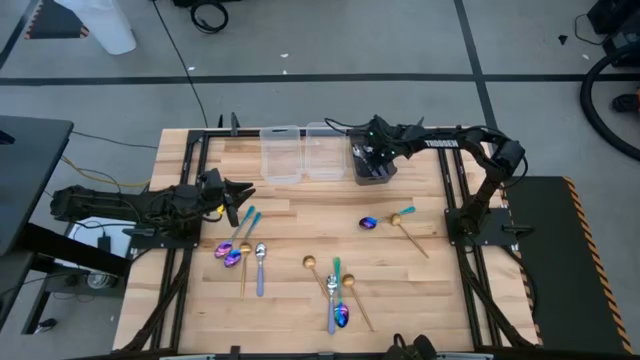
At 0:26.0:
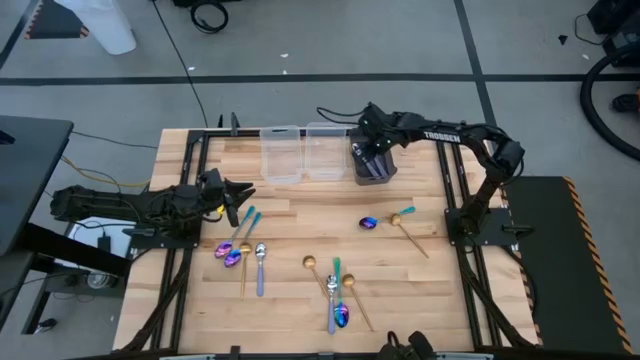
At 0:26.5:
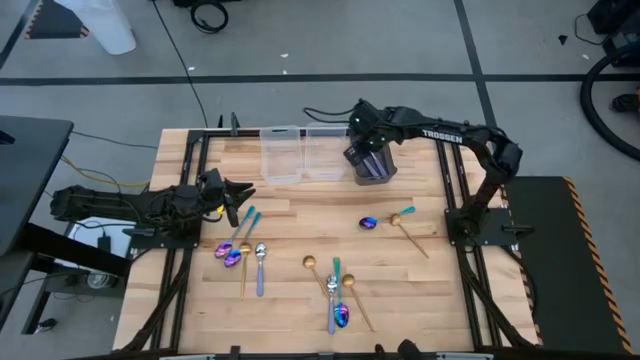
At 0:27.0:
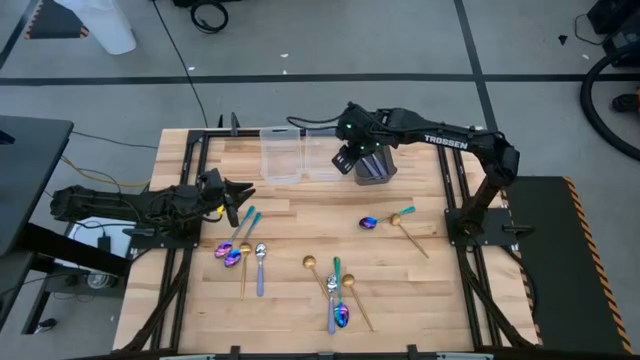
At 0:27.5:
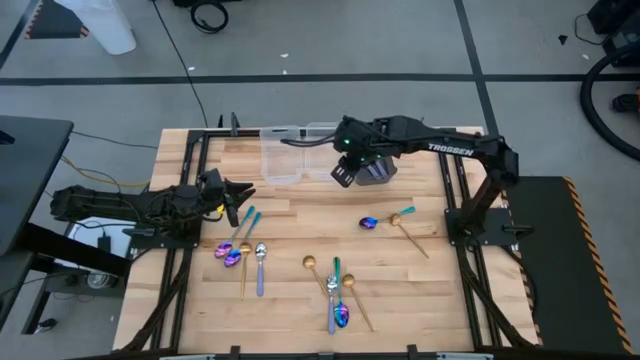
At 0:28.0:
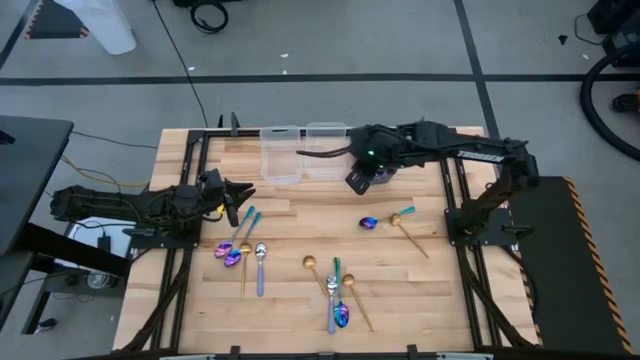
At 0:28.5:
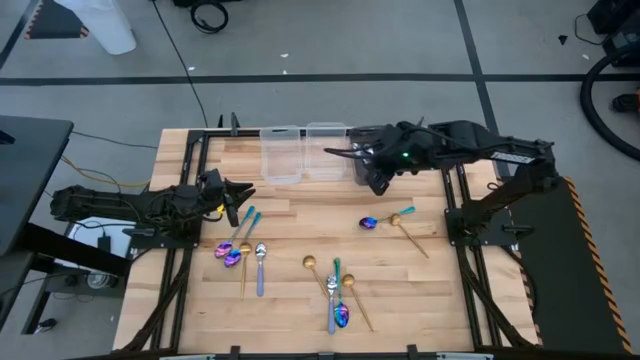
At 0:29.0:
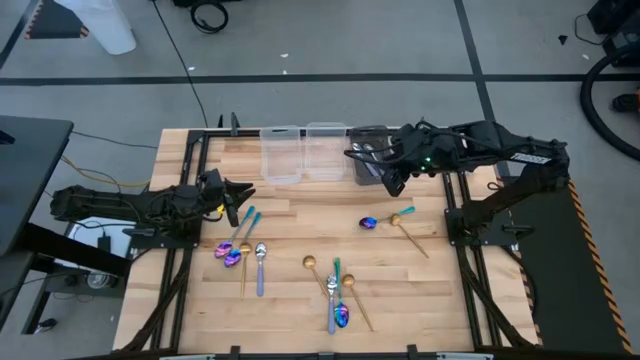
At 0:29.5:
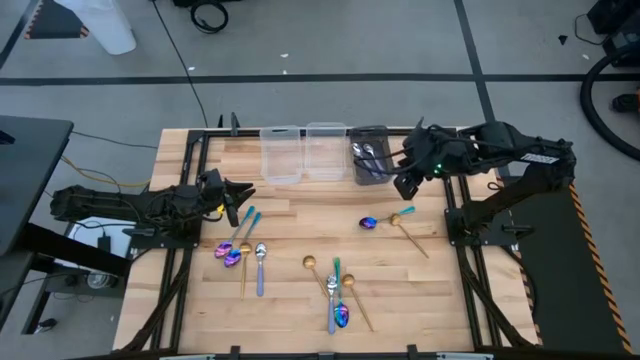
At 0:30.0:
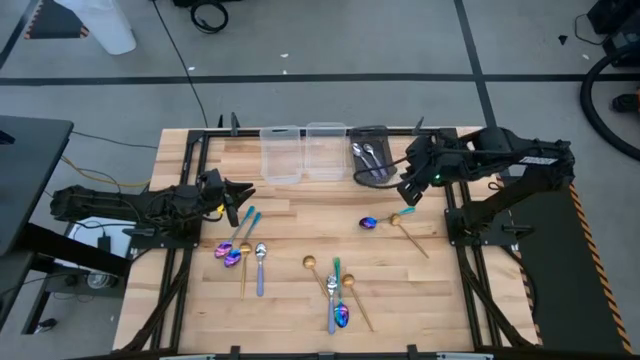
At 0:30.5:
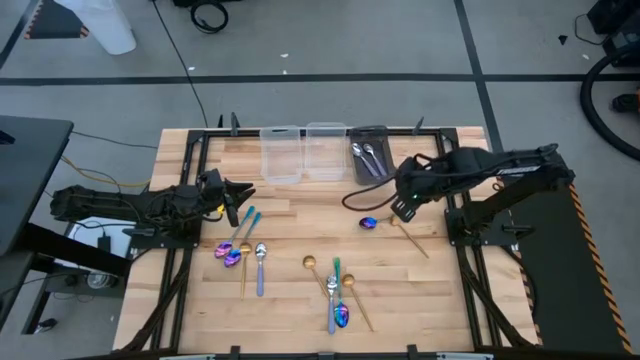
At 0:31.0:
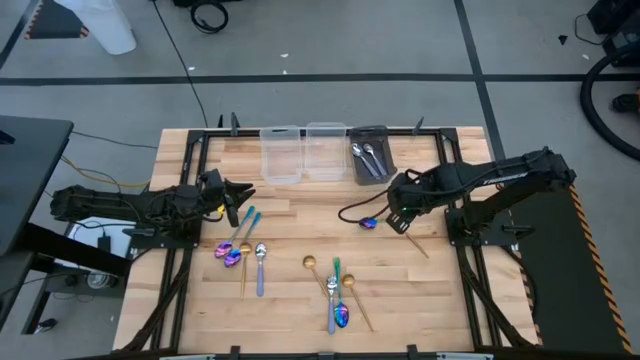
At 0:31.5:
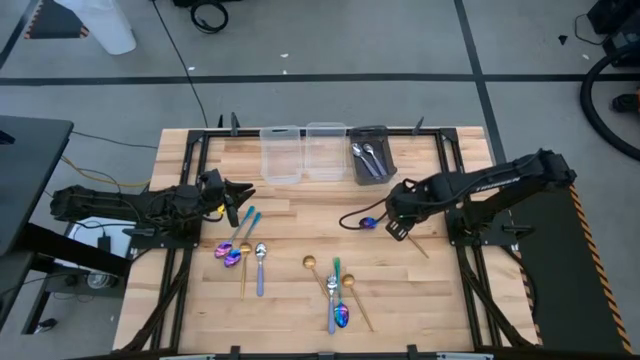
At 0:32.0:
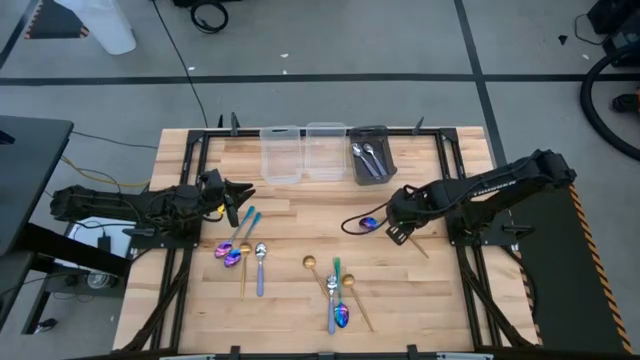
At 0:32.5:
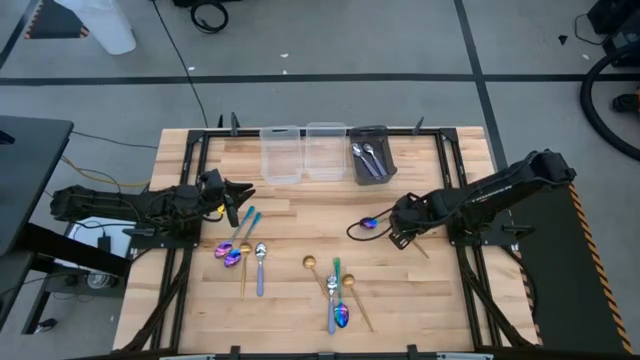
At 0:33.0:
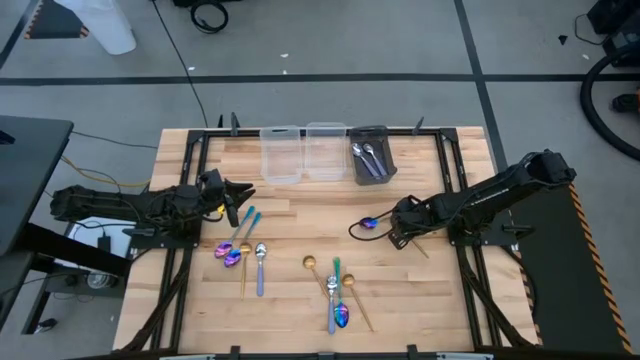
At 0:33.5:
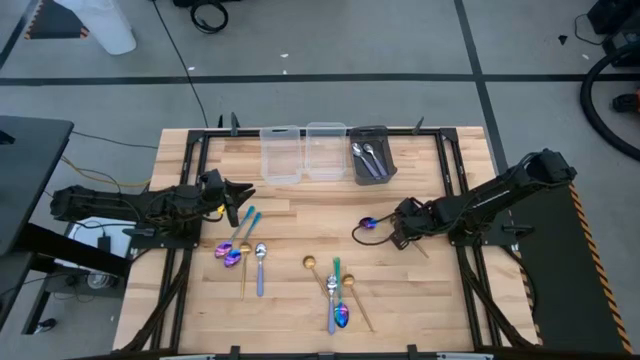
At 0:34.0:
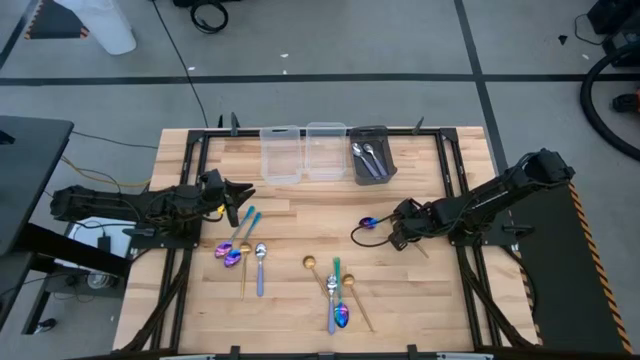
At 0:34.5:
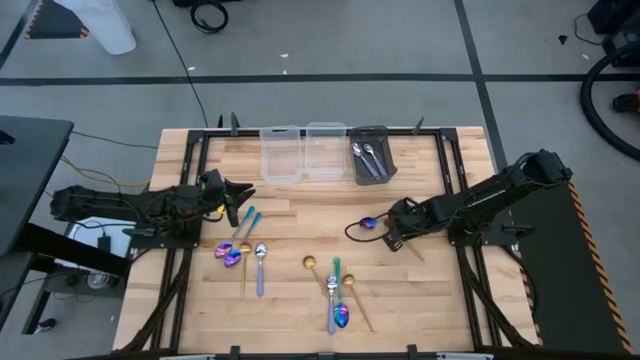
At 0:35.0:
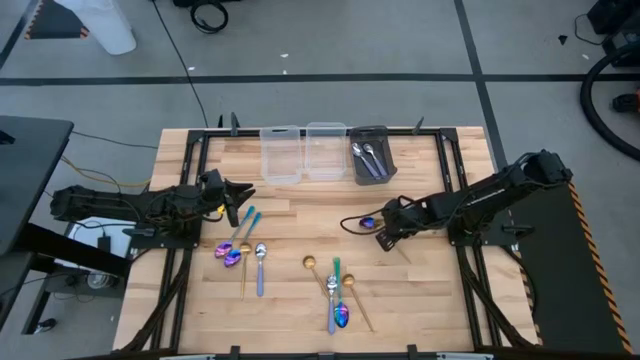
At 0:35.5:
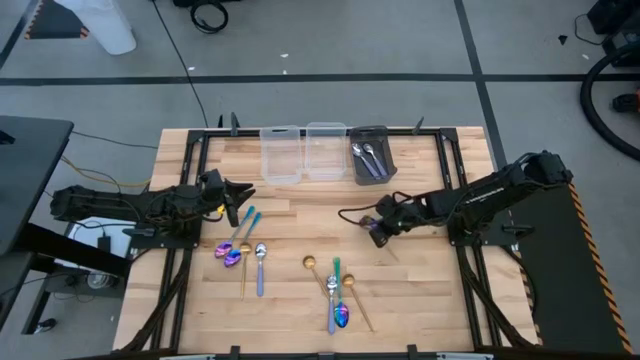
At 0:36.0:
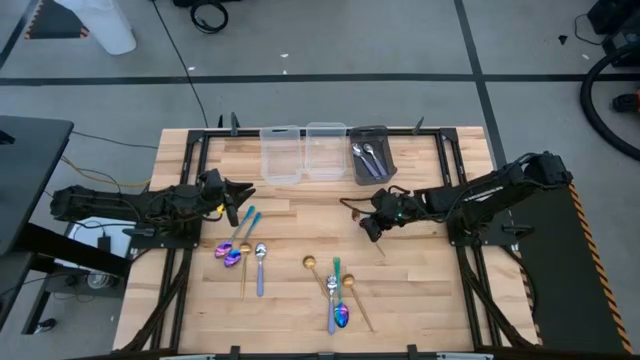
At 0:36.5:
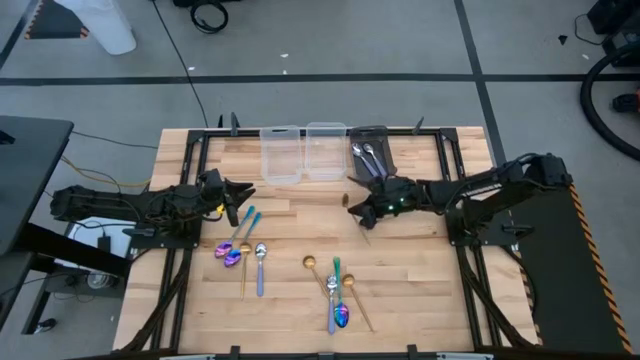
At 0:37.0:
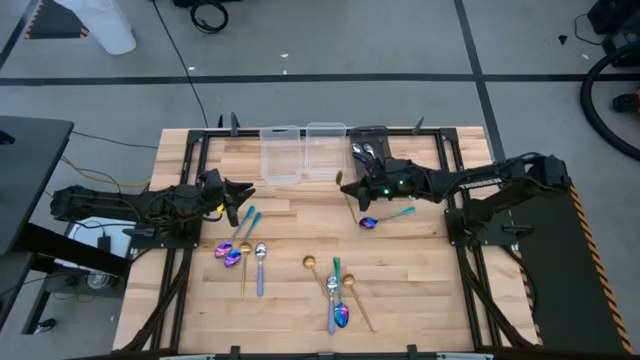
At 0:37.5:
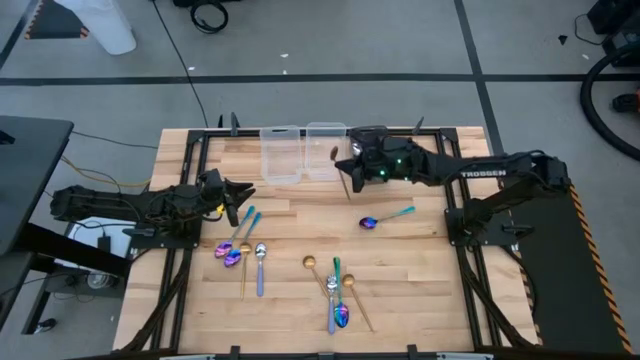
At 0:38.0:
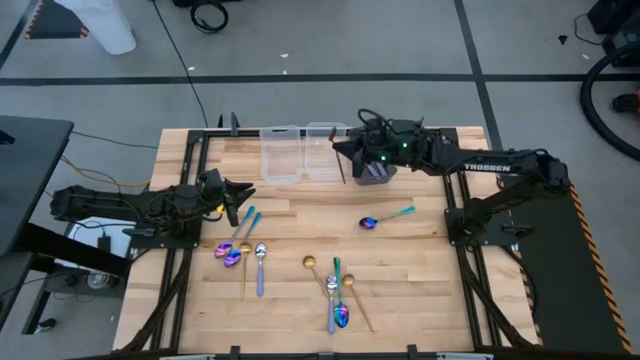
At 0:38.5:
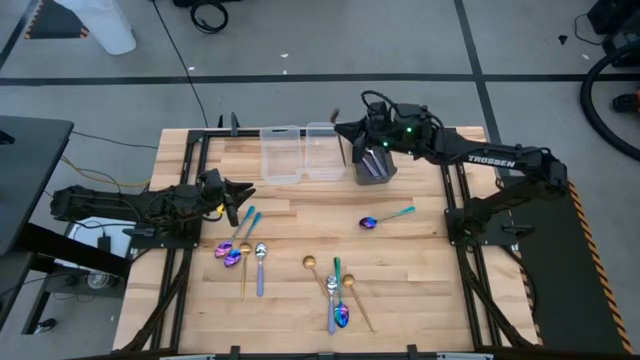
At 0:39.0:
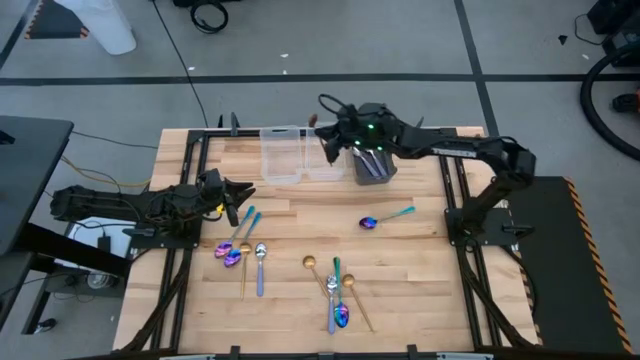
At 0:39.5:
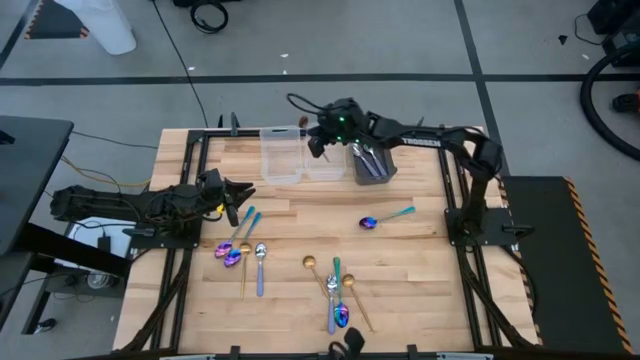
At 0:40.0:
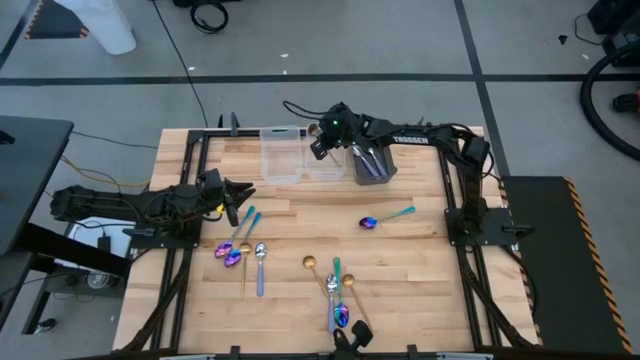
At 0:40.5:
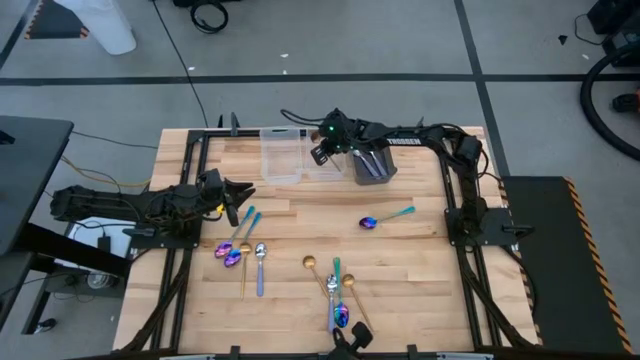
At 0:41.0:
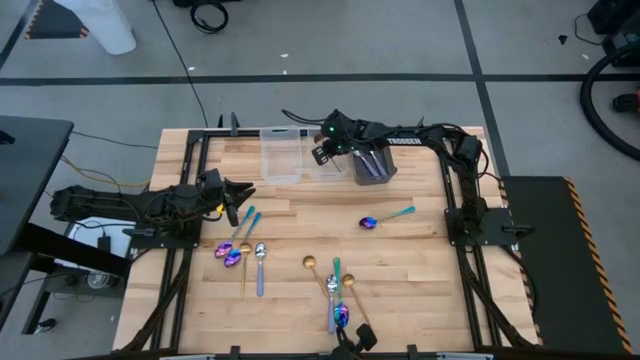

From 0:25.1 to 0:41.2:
Task: Sort silverware by color (type)
Put the gold spoon into the right transparent bin

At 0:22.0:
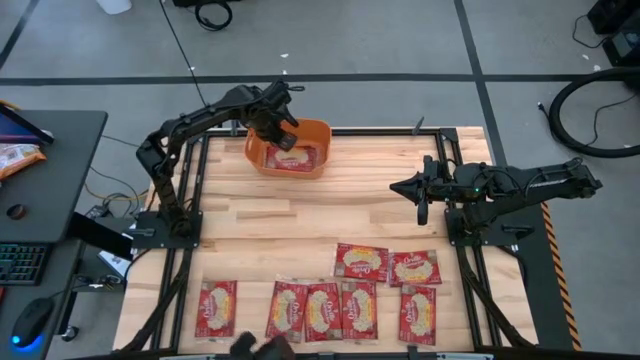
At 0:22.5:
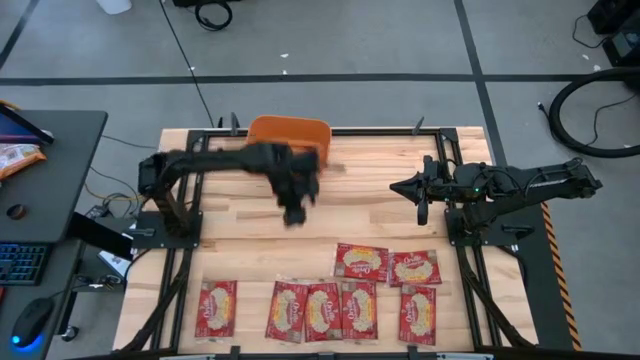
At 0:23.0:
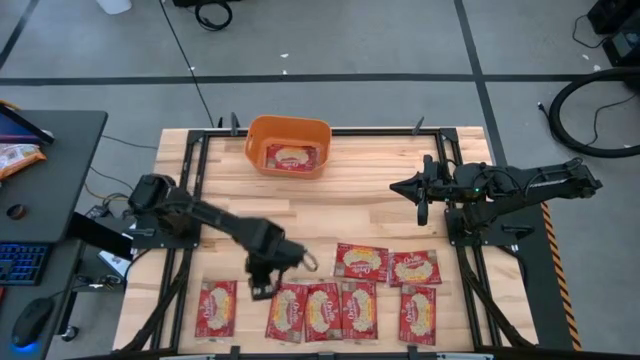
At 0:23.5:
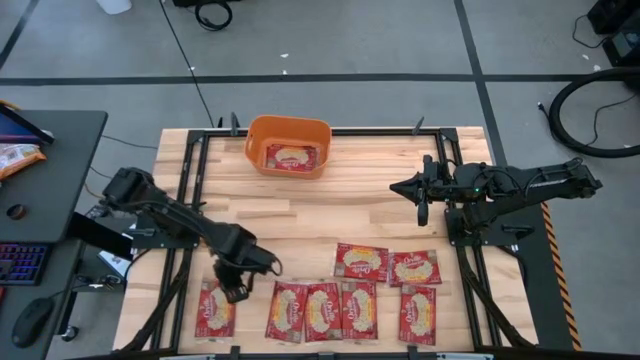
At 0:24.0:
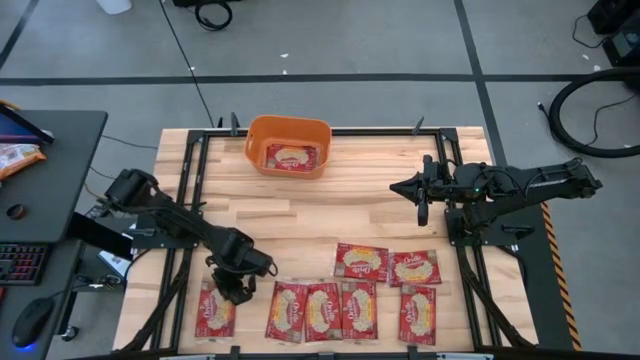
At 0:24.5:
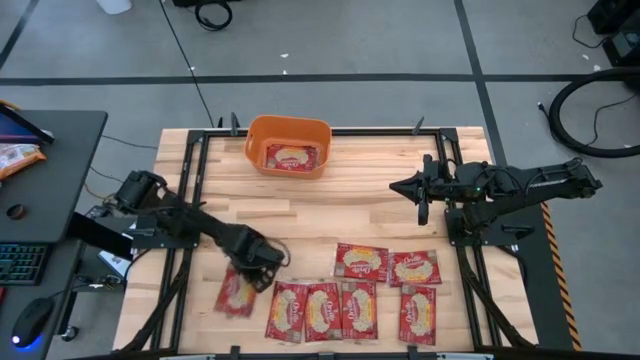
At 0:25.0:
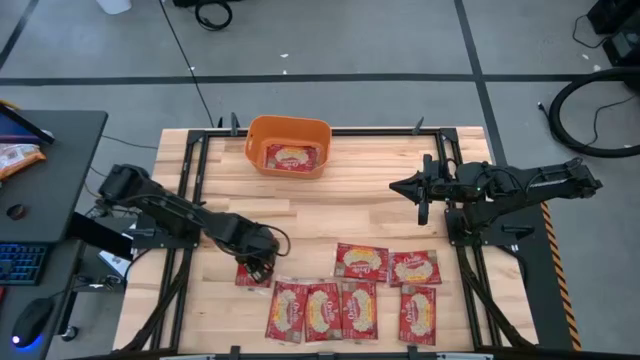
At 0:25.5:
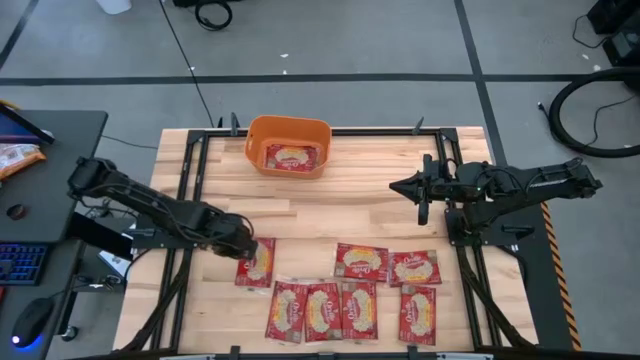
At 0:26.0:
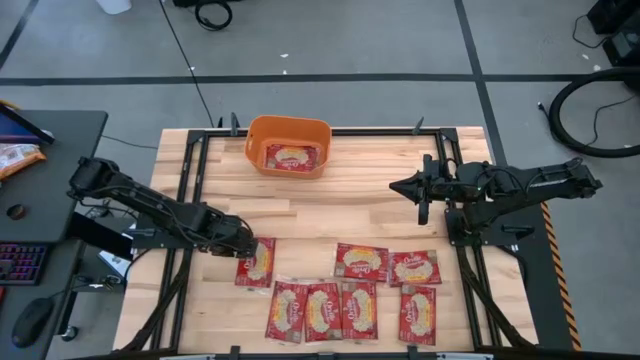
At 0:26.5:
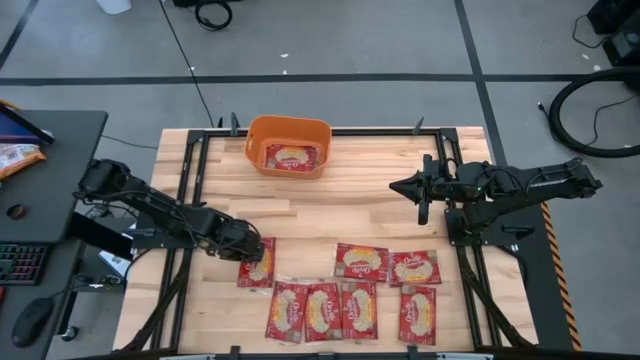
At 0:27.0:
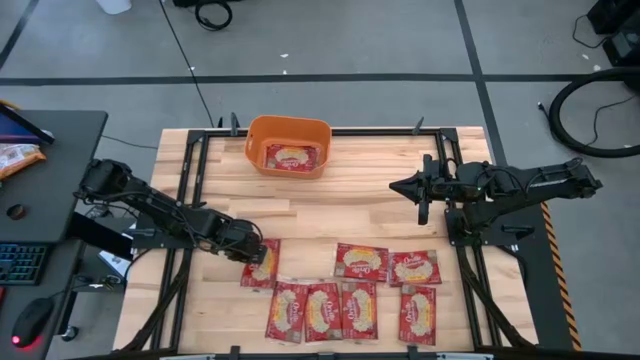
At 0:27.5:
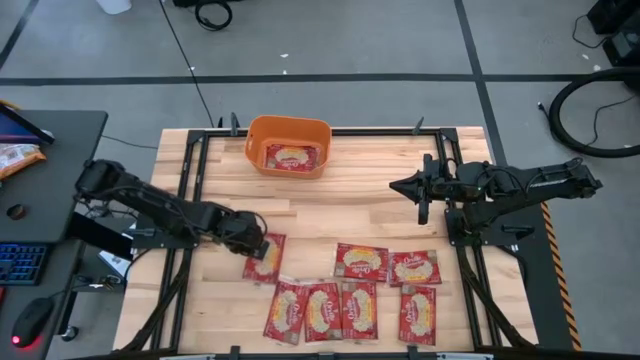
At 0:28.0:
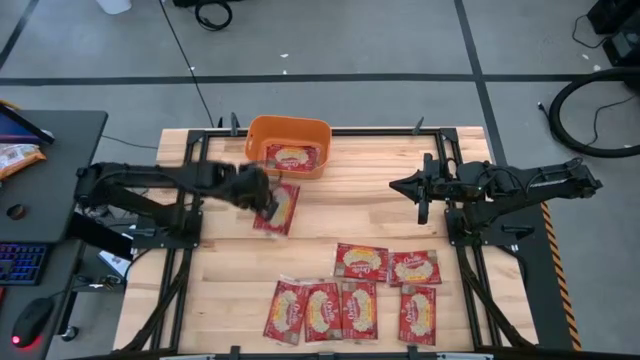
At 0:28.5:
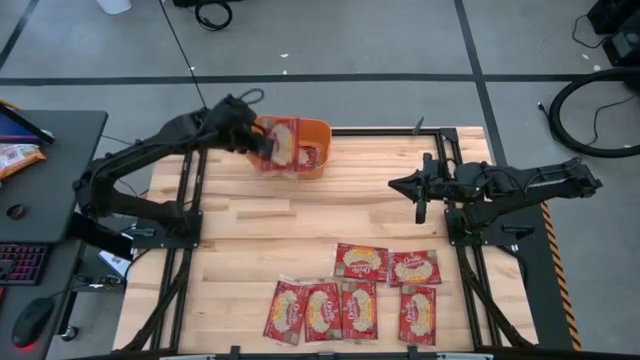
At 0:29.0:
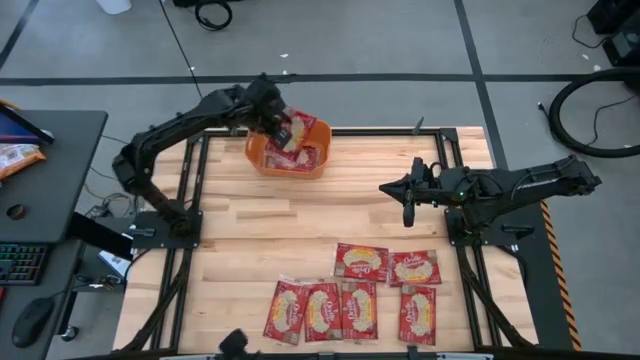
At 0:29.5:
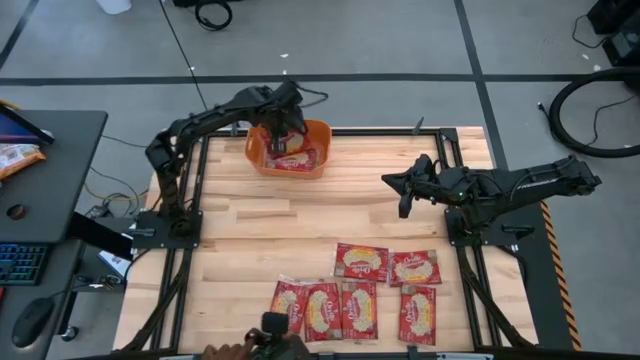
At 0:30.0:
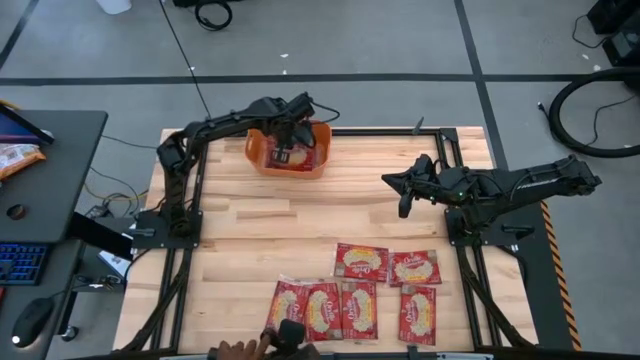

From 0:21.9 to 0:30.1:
Task: Sort popcorn bags into baskets
Put the red popcorn bag into the orange container
